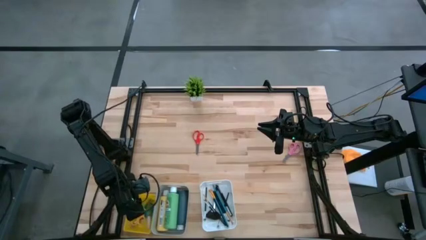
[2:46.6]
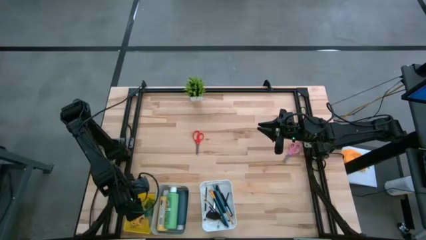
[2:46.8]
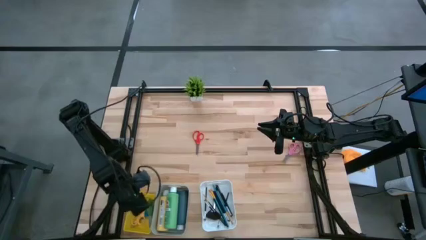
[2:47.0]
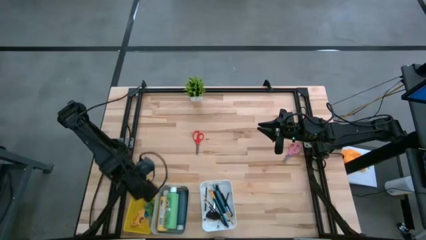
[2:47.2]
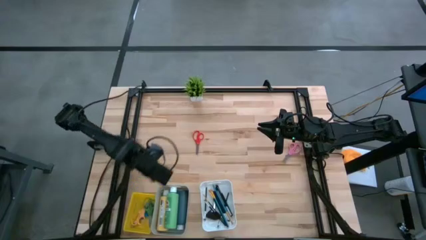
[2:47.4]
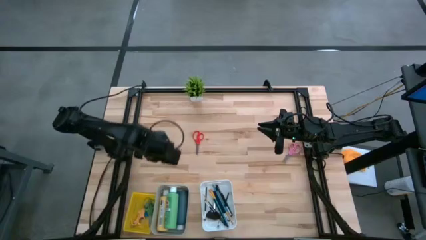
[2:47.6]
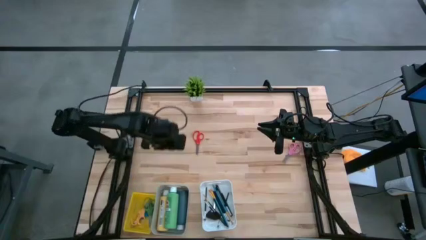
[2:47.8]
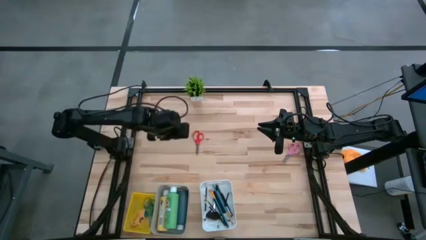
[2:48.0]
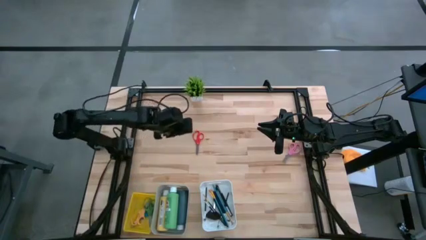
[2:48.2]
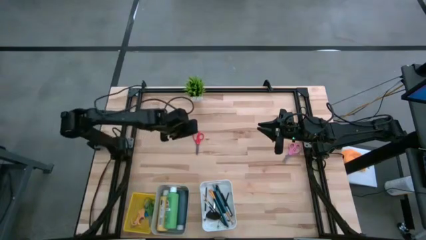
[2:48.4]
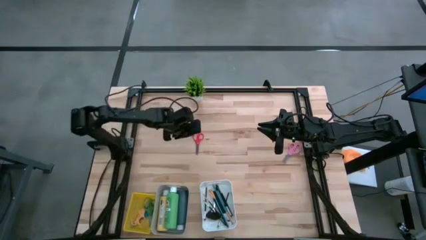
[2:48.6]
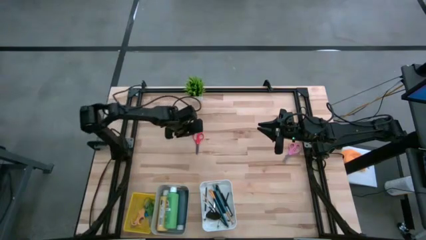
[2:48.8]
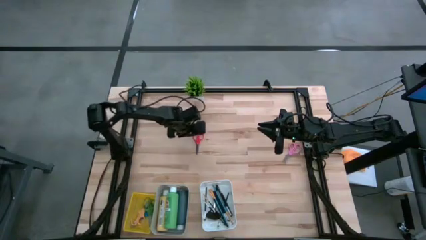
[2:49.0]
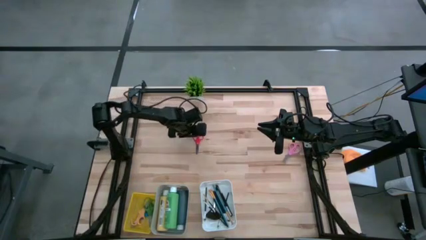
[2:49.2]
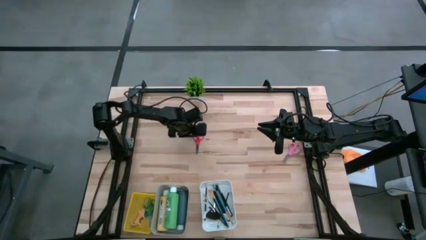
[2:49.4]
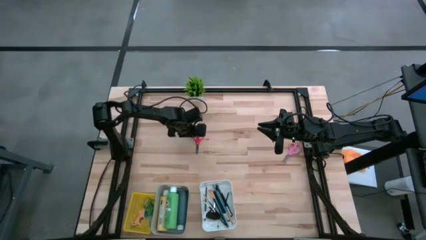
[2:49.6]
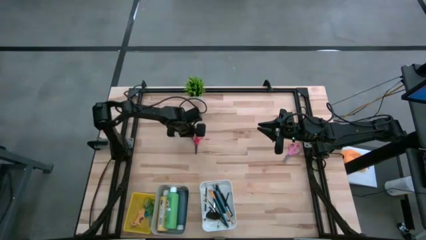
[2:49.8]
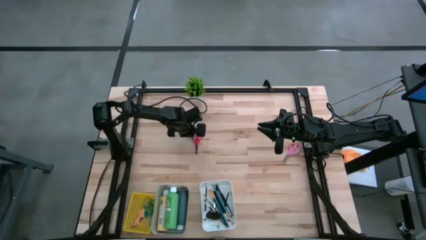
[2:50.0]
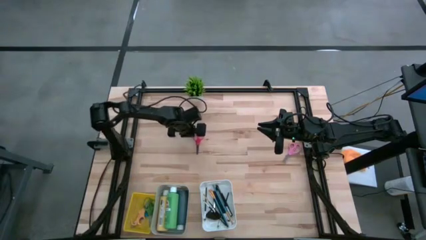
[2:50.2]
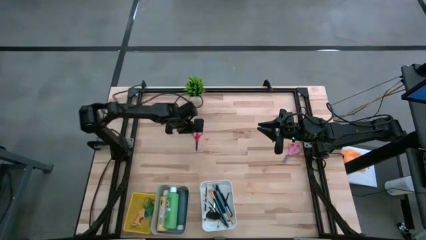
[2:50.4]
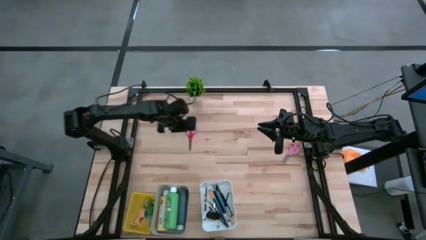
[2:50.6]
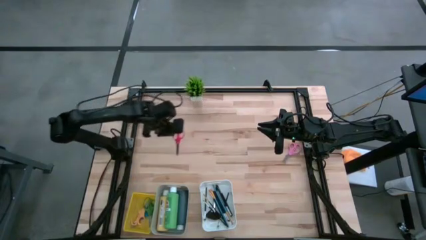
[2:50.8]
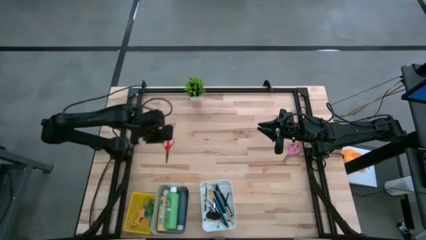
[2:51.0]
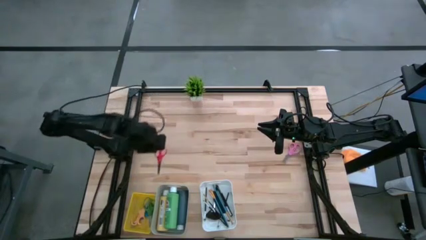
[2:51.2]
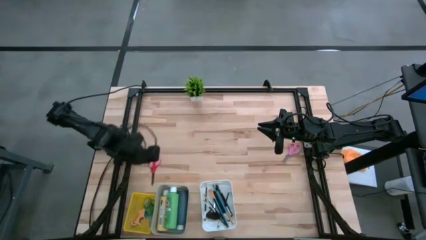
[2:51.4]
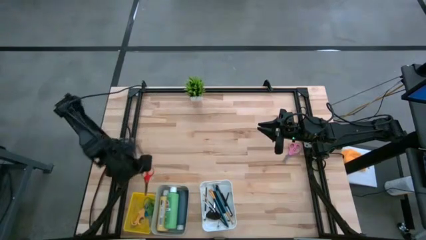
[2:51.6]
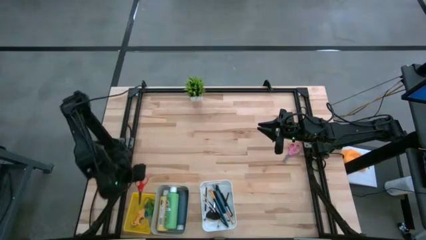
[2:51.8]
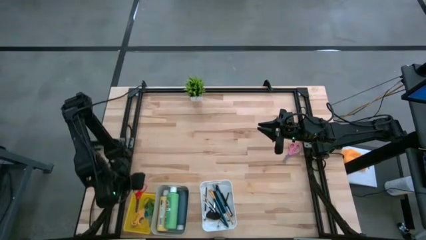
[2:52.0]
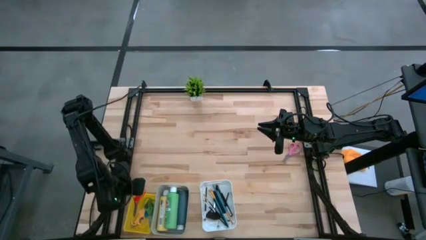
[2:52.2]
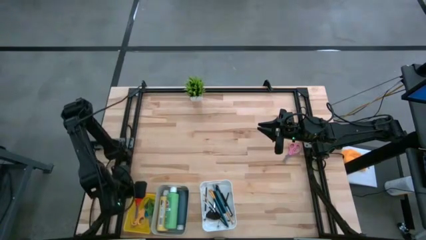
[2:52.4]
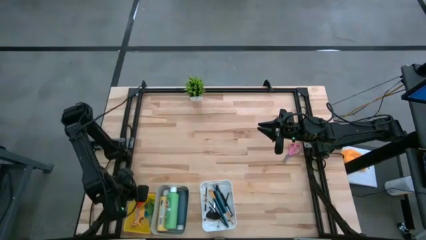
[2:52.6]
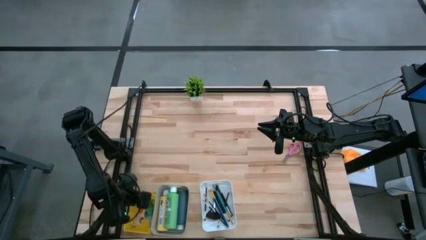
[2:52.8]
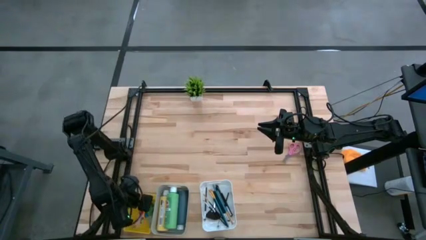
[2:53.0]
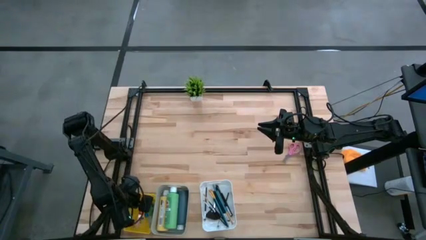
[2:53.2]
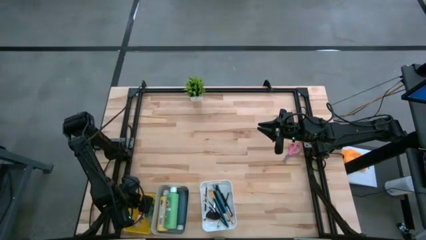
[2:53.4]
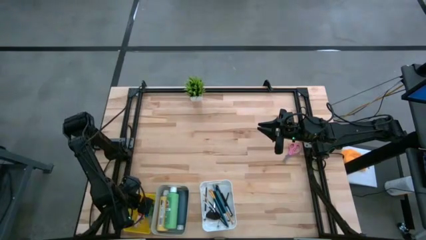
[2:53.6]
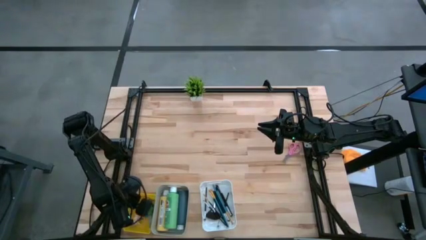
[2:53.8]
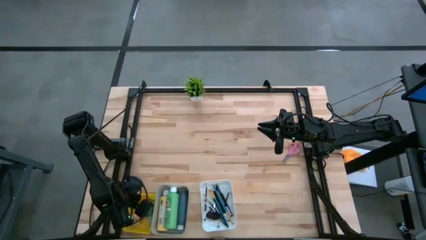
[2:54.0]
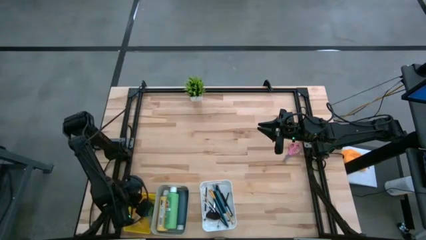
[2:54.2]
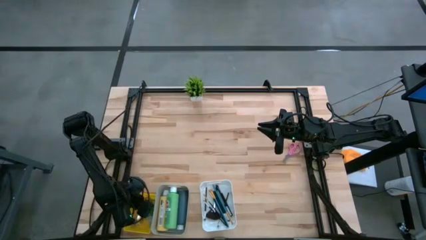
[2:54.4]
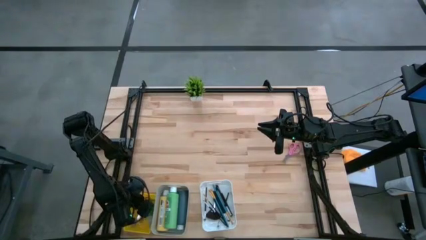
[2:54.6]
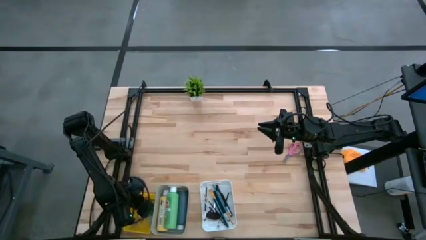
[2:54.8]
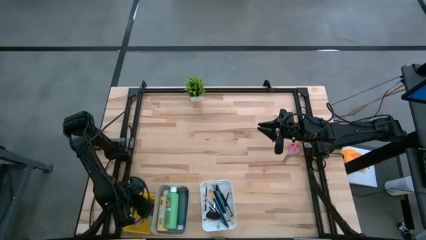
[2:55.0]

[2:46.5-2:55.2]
Task: Pick & Place Paint Supplies
Put the red scissors into the yellow bin

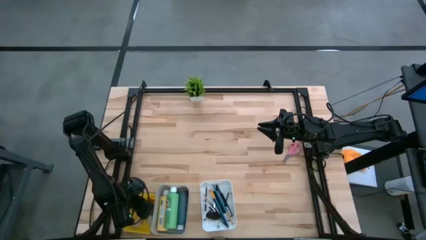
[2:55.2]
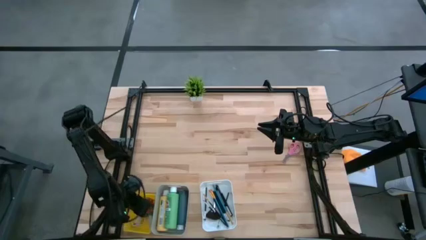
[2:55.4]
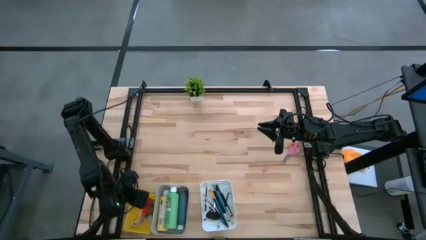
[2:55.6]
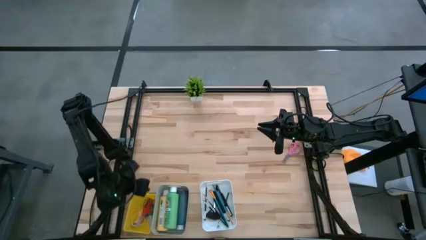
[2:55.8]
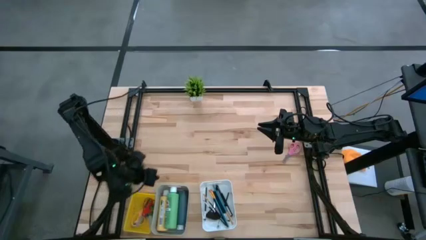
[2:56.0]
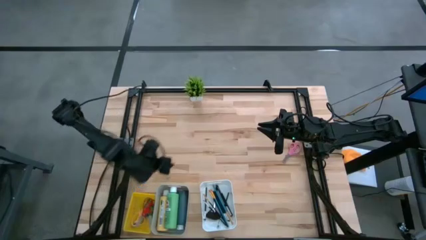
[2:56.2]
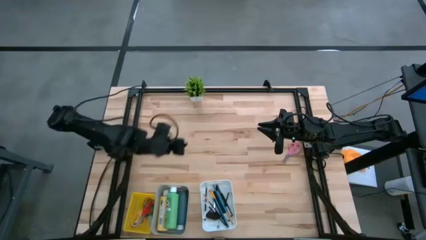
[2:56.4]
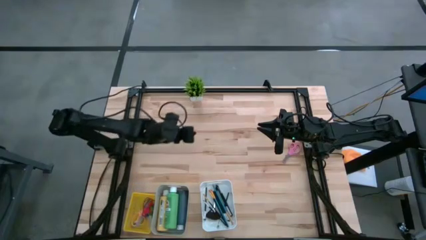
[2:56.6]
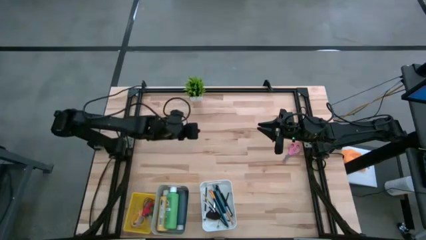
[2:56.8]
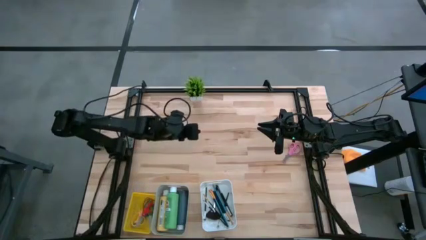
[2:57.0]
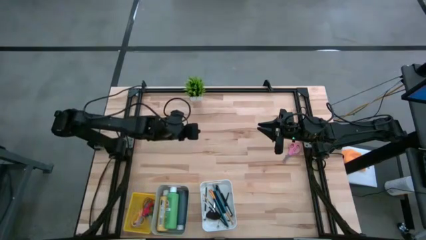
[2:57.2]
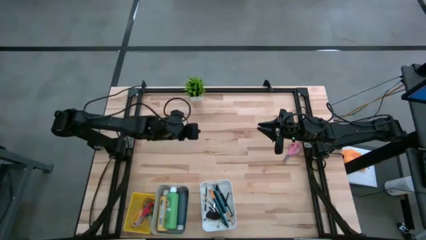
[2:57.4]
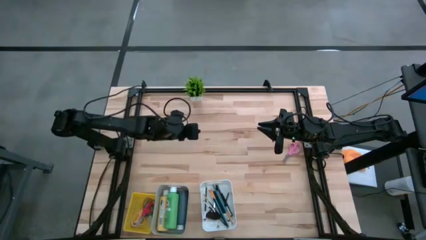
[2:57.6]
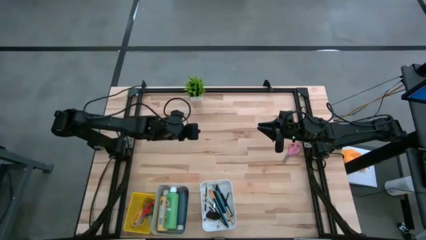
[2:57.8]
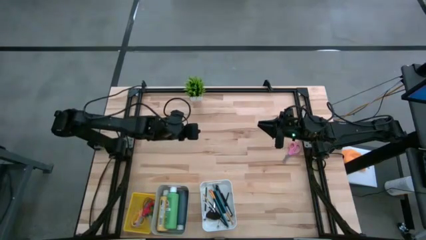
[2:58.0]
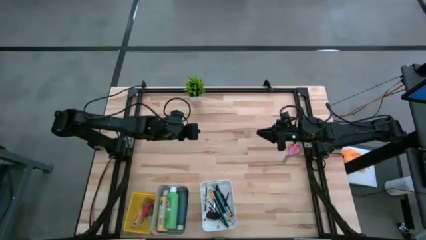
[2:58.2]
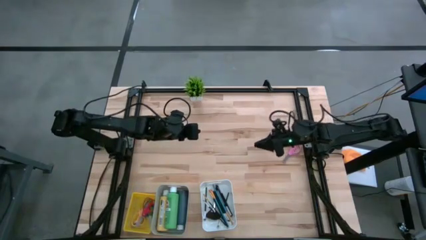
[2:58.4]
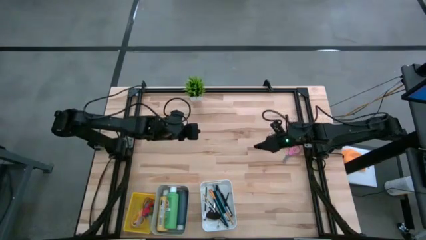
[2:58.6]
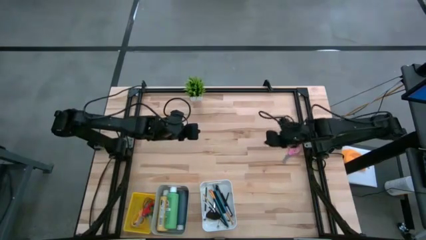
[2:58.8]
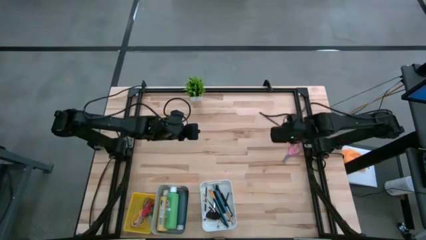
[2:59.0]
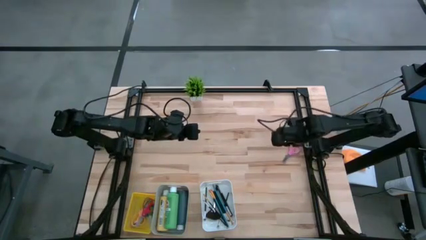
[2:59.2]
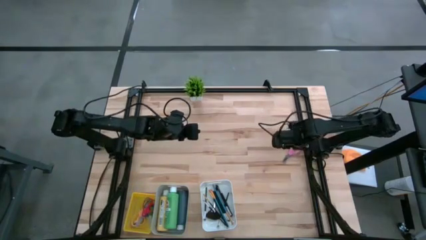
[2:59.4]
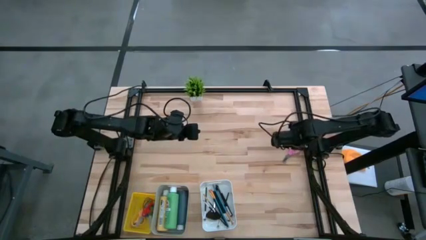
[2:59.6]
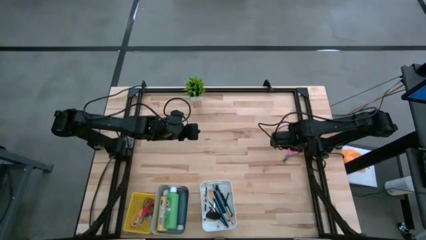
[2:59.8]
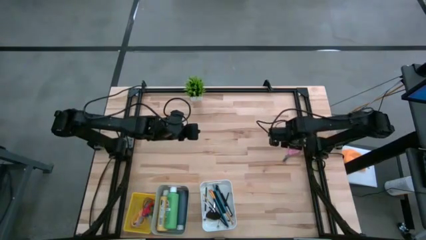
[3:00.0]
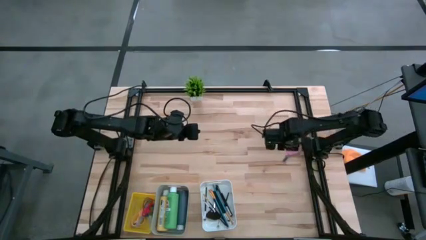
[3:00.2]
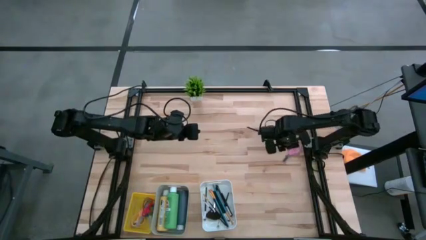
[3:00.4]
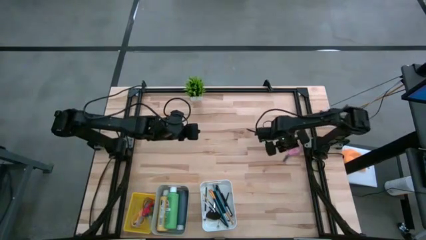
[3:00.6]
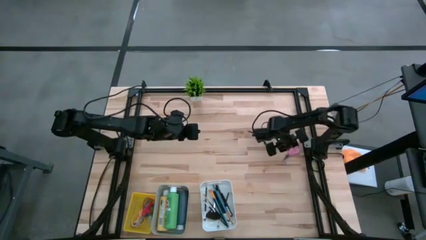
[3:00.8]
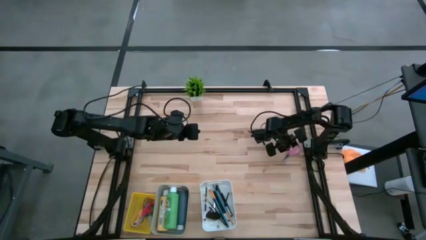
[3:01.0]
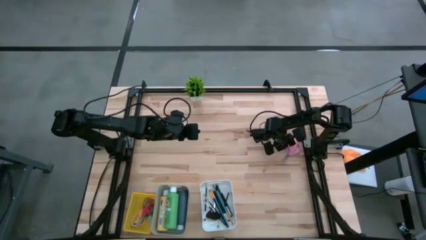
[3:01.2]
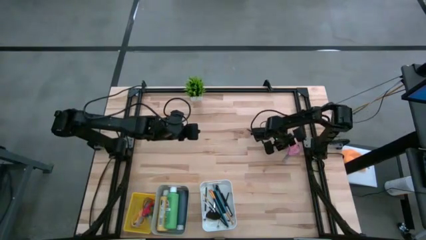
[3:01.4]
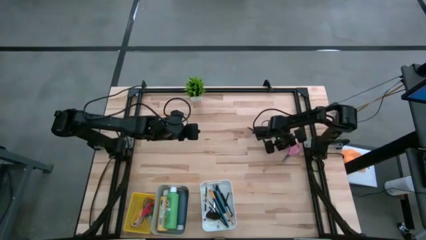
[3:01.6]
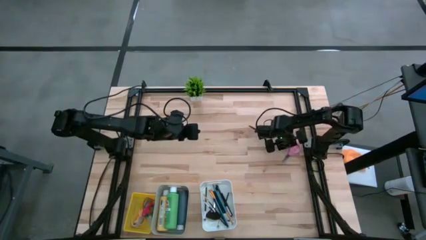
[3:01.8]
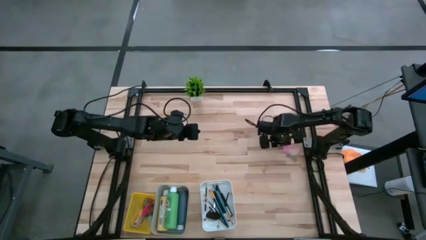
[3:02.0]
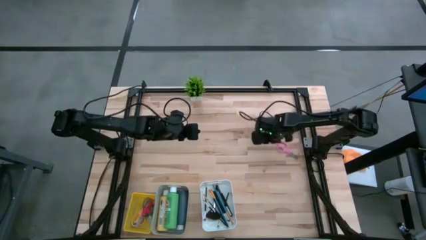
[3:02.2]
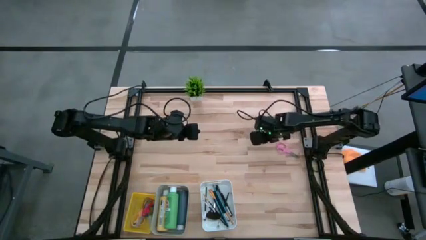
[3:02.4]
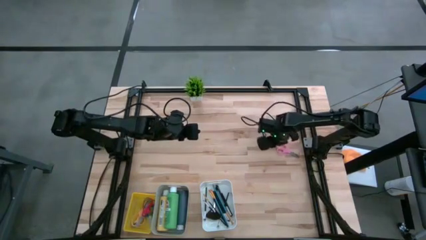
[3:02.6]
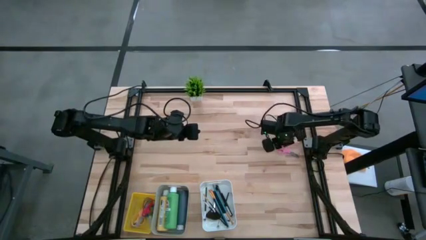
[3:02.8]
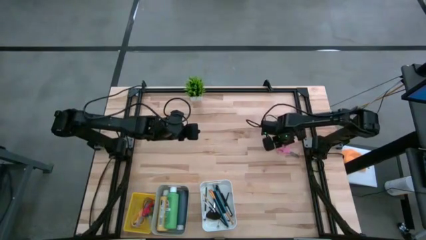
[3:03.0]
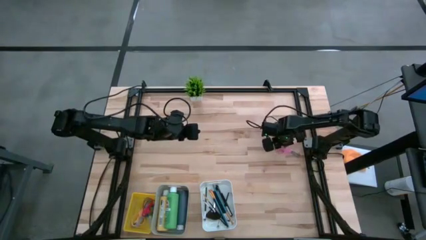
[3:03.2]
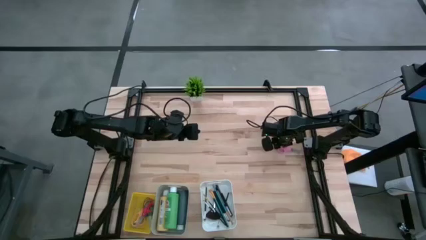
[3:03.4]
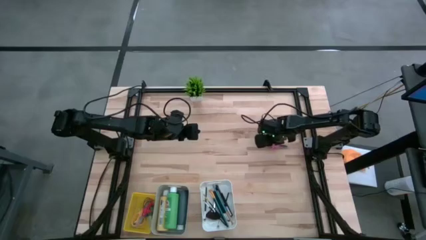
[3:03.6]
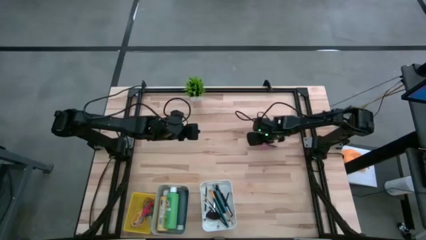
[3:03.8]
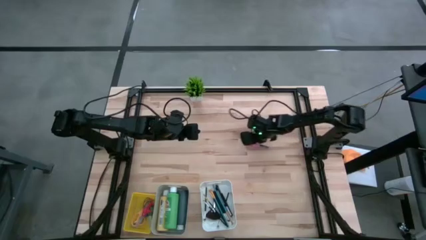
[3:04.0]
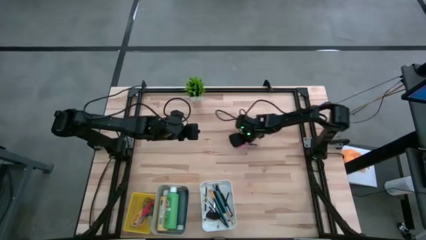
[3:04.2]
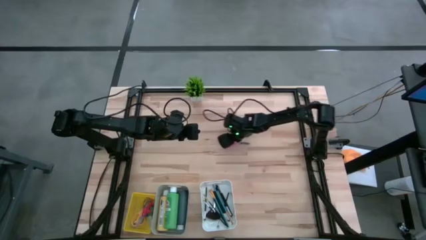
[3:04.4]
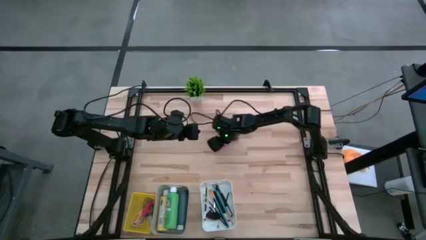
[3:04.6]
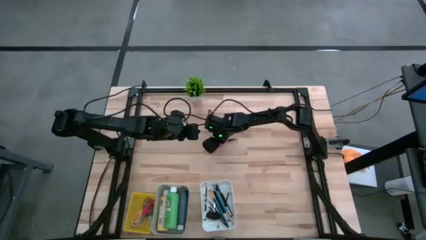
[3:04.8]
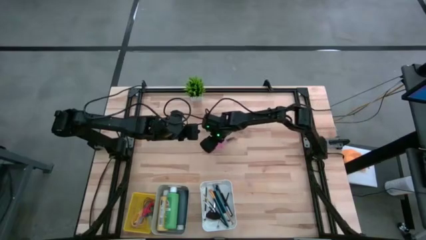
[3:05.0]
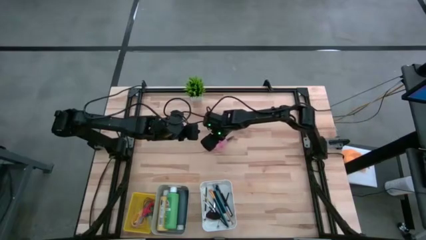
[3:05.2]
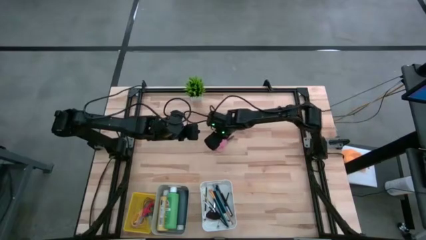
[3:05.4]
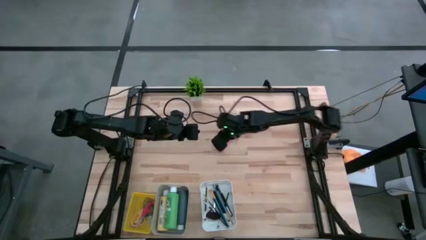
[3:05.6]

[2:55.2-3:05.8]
Put the pink scissors into the yellow bin
